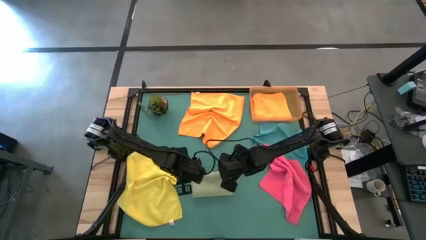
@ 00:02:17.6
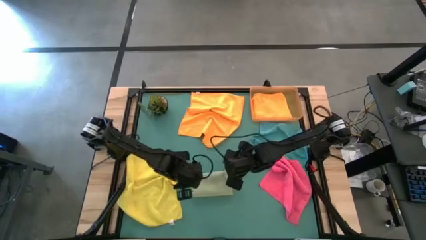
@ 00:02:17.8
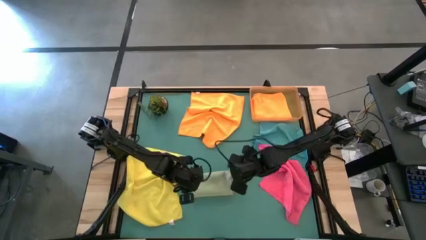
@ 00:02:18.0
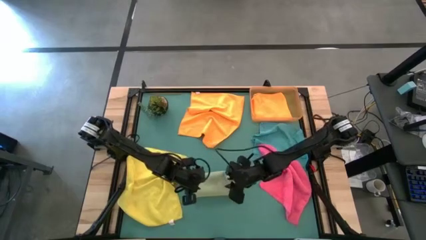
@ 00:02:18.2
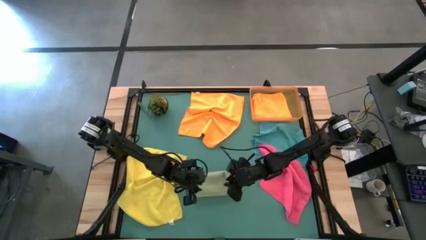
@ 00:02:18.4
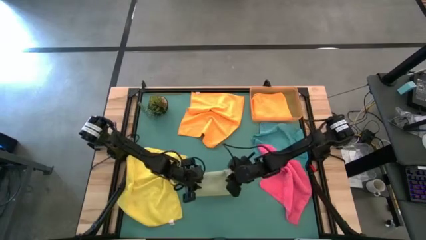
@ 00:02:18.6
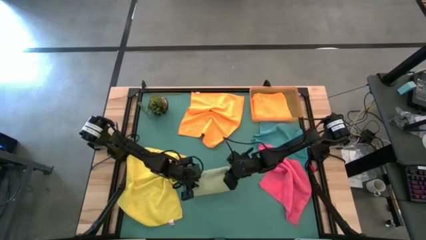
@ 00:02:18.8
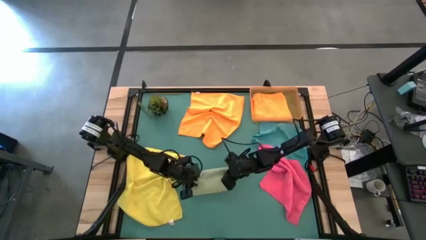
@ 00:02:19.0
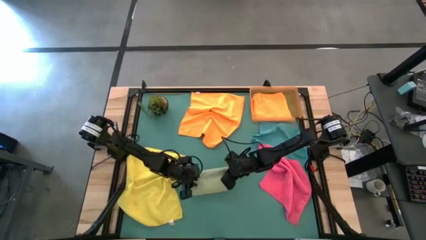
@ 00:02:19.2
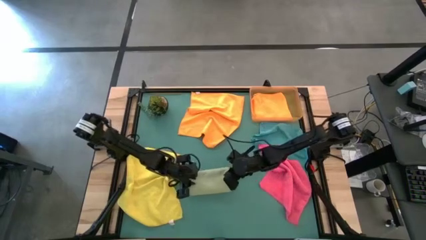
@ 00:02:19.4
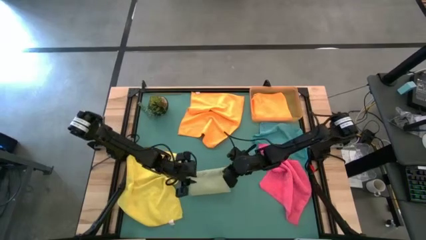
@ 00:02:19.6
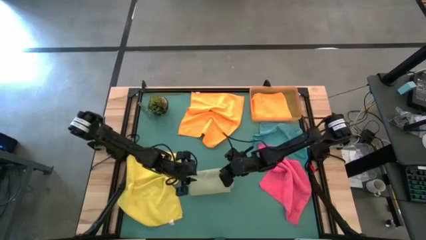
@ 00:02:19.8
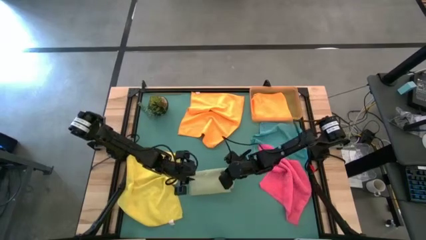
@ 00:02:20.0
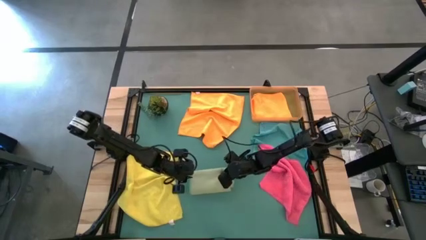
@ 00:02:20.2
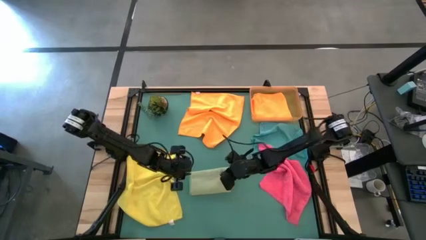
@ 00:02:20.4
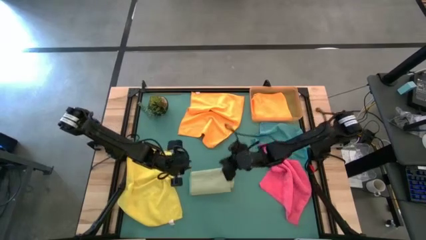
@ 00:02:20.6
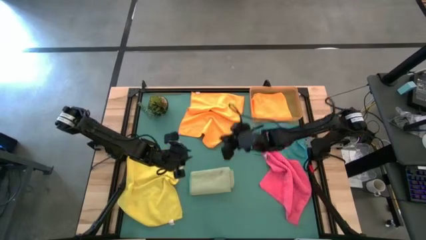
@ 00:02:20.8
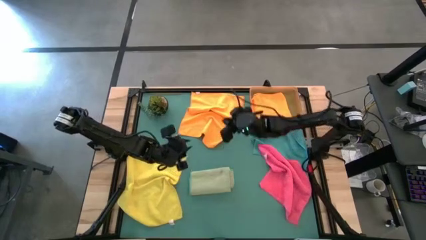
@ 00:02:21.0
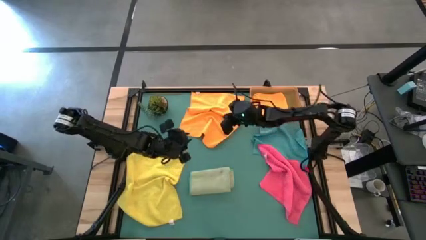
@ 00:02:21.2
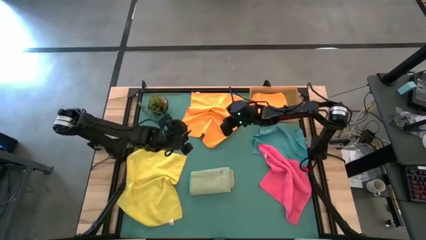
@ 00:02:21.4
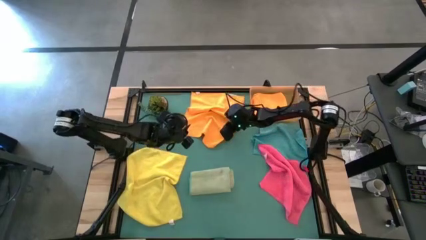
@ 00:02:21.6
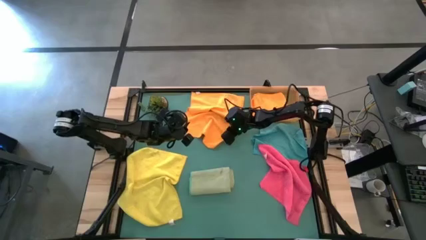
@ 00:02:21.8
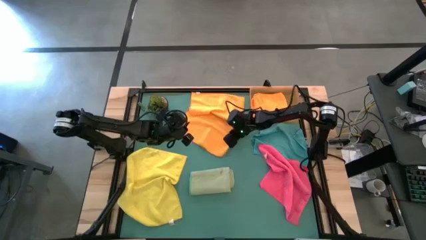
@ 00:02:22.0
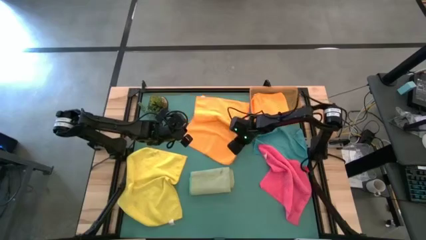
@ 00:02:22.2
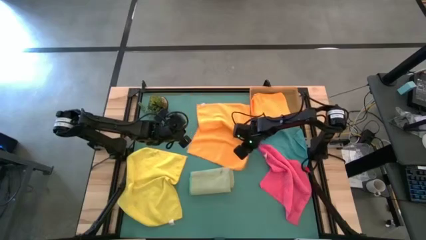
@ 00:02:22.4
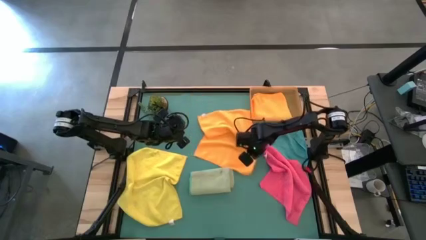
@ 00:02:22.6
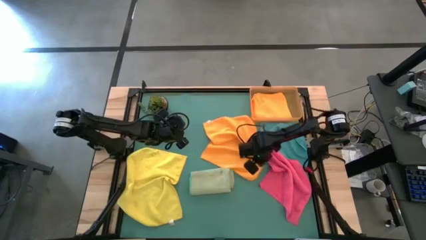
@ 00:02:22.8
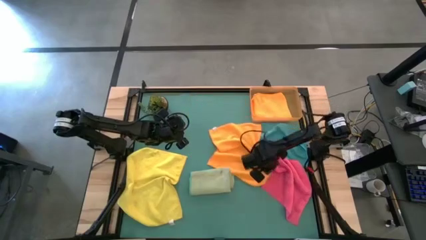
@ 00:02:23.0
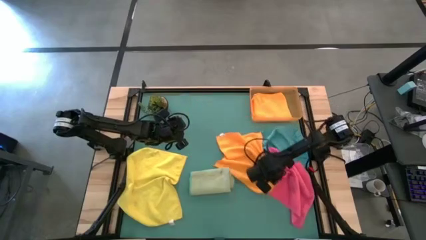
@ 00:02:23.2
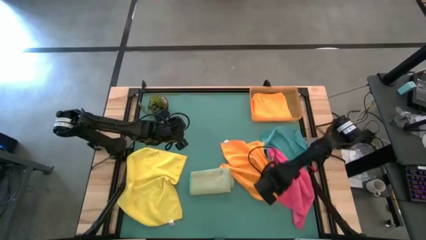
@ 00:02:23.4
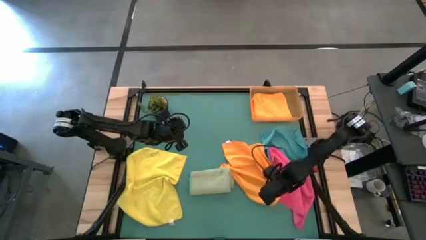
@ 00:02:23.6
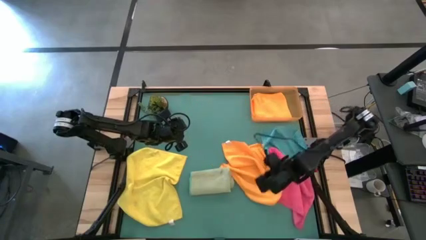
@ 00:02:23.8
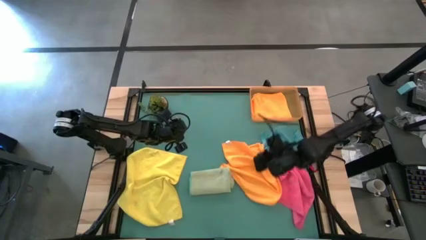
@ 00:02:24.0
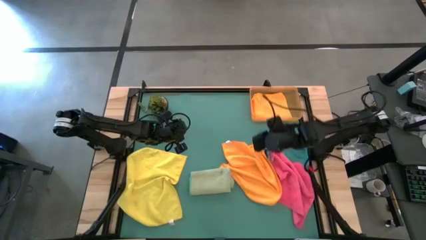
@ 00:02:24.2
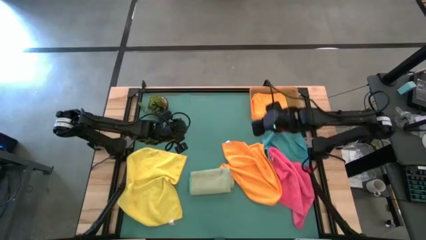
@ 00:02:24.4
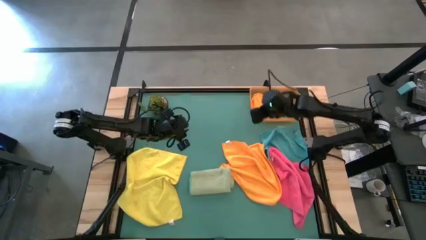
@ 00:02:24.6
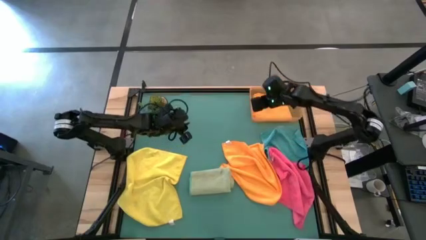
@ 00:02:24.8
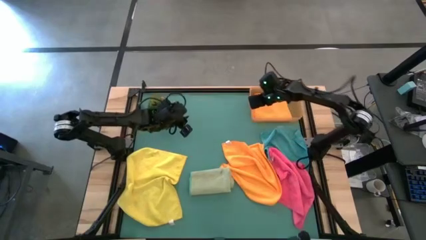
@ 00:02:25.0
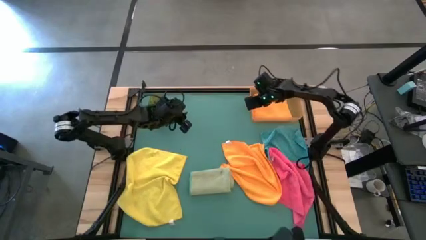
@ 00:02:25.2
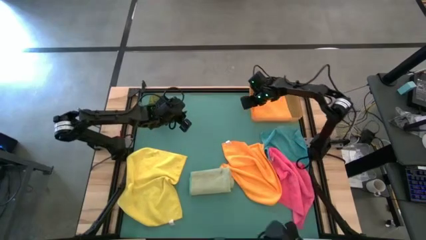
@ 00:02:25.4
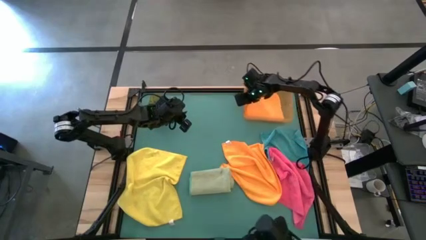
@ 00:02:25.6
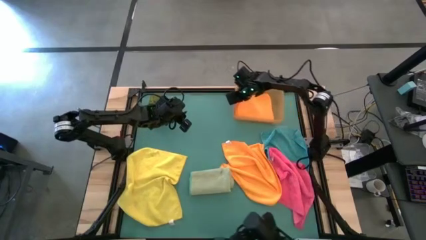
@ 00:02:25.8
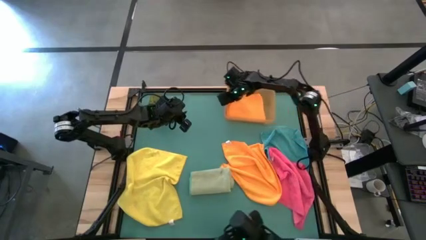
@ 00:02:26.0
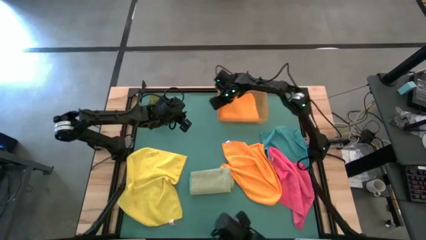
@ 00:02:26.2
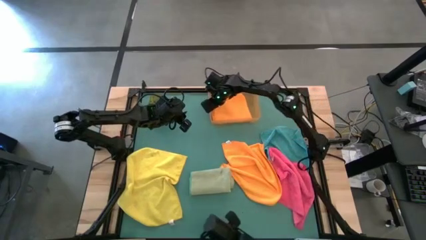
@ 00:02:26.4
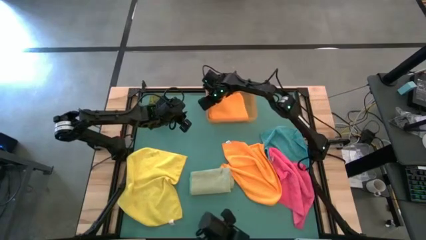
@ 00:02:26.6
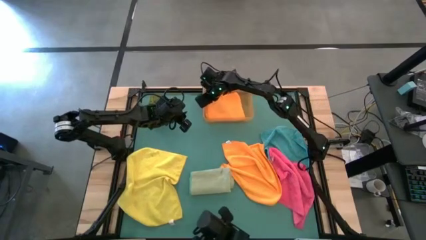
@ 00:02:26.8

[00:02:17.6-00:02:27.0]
Task: Fold microfiber towels
Adjust the orange bin

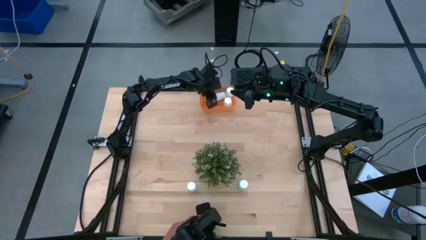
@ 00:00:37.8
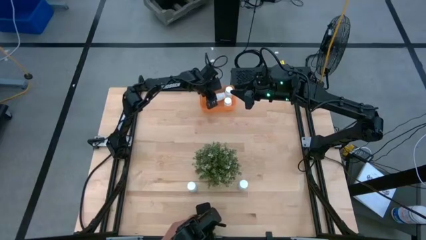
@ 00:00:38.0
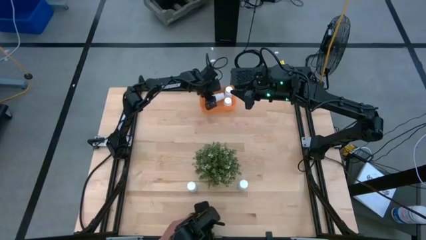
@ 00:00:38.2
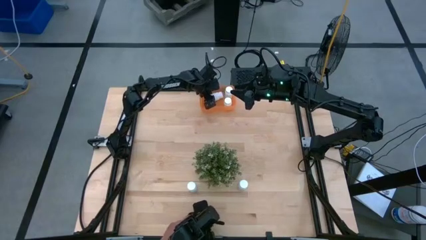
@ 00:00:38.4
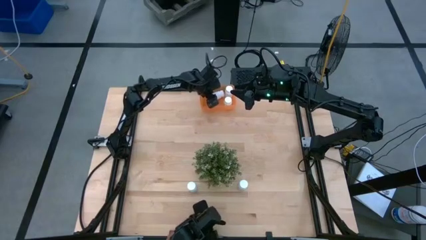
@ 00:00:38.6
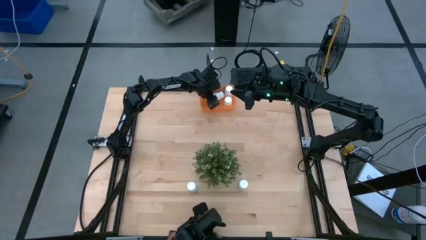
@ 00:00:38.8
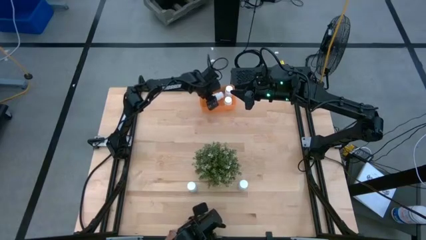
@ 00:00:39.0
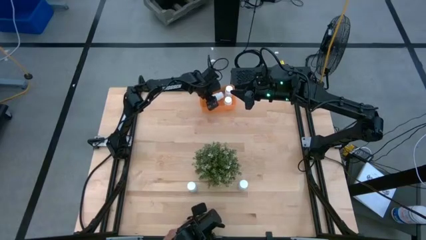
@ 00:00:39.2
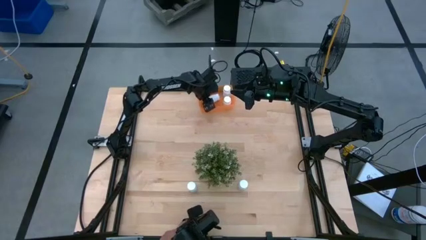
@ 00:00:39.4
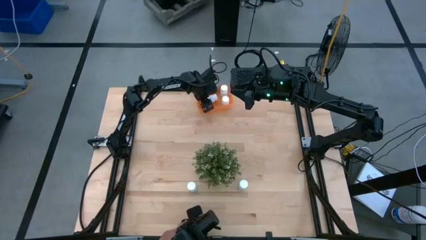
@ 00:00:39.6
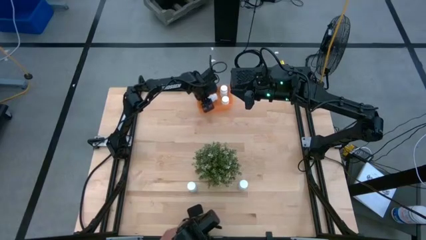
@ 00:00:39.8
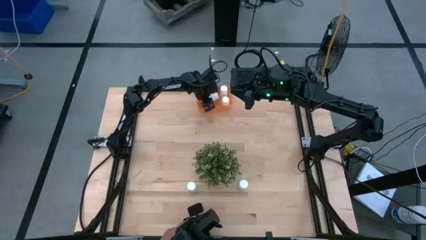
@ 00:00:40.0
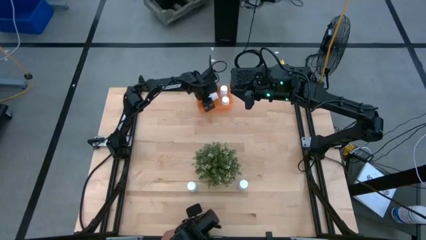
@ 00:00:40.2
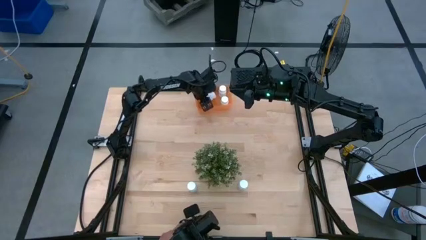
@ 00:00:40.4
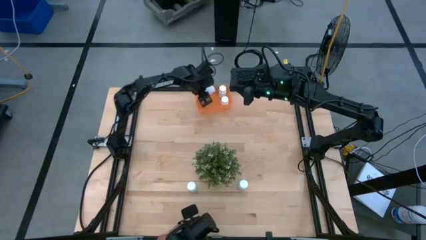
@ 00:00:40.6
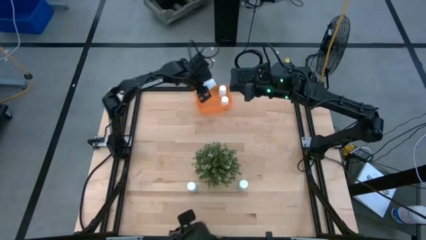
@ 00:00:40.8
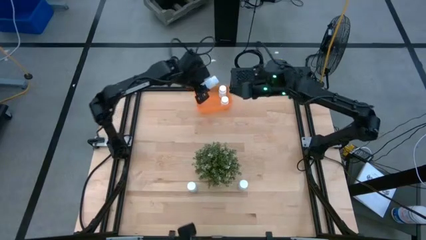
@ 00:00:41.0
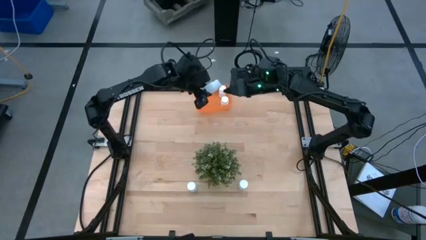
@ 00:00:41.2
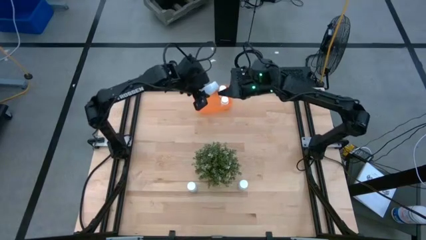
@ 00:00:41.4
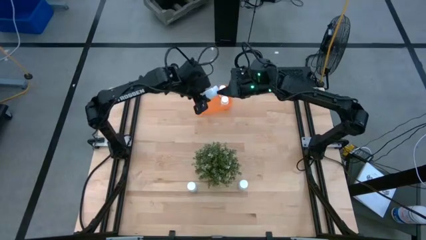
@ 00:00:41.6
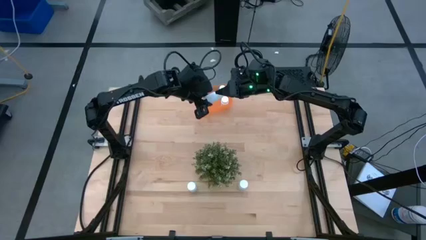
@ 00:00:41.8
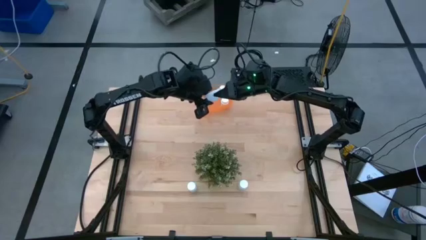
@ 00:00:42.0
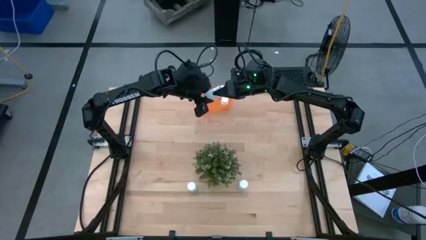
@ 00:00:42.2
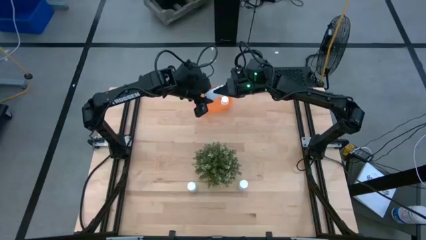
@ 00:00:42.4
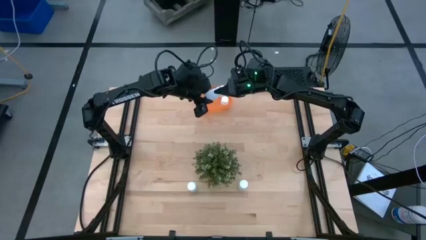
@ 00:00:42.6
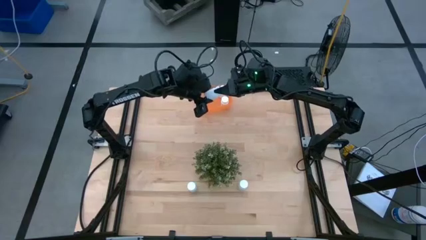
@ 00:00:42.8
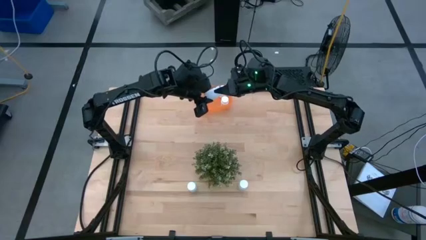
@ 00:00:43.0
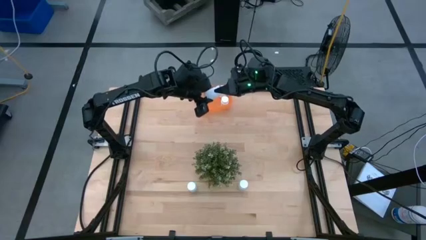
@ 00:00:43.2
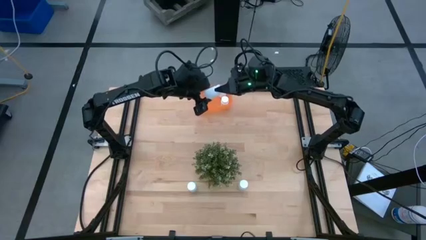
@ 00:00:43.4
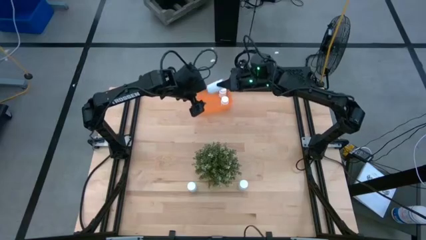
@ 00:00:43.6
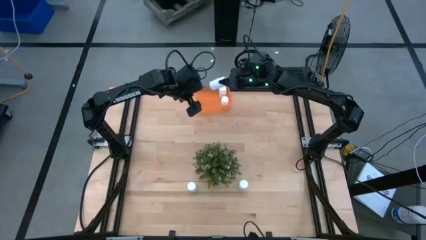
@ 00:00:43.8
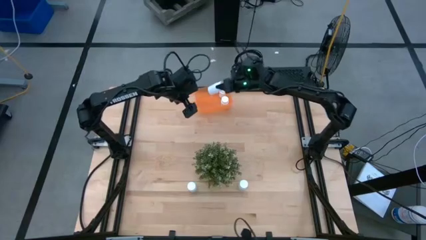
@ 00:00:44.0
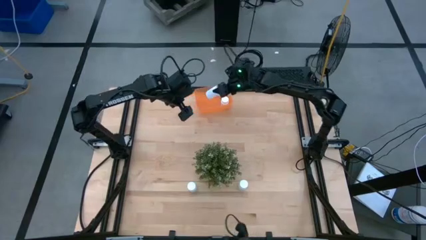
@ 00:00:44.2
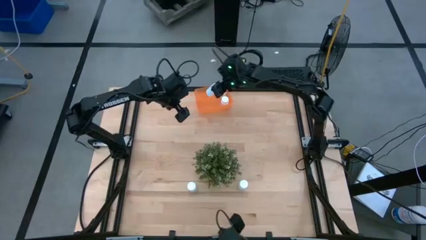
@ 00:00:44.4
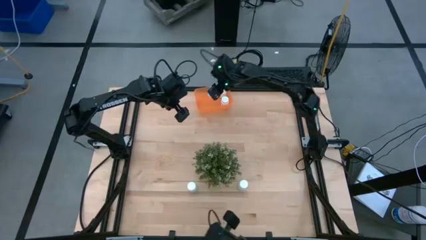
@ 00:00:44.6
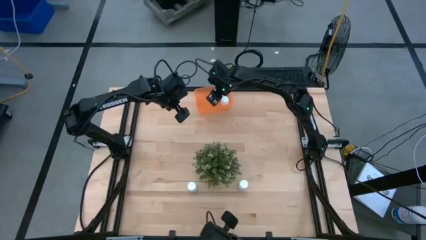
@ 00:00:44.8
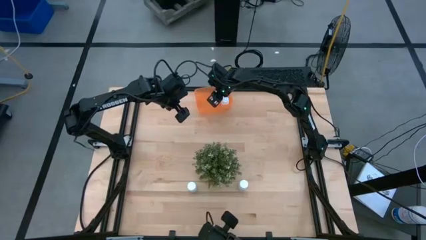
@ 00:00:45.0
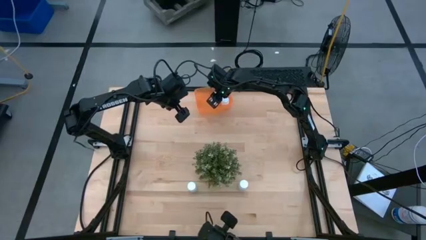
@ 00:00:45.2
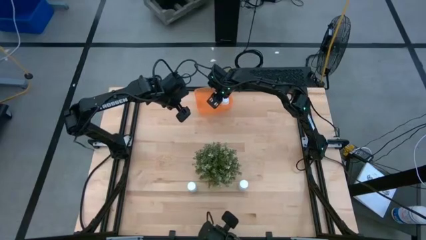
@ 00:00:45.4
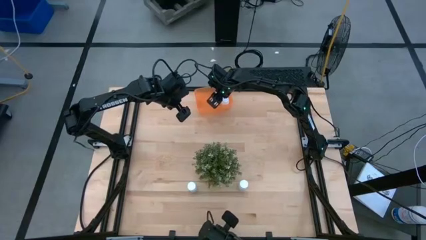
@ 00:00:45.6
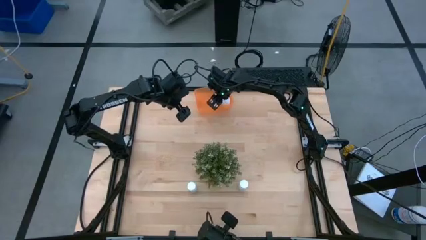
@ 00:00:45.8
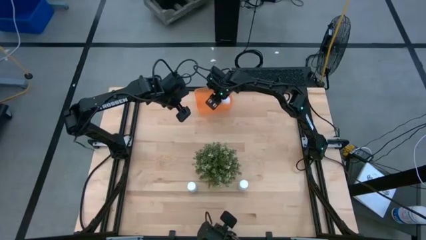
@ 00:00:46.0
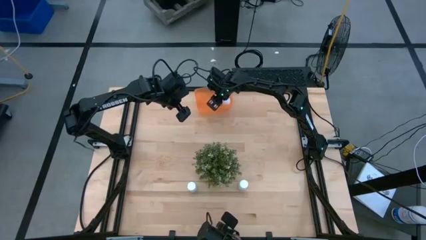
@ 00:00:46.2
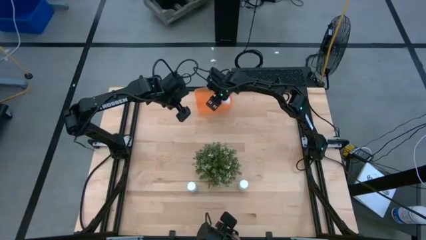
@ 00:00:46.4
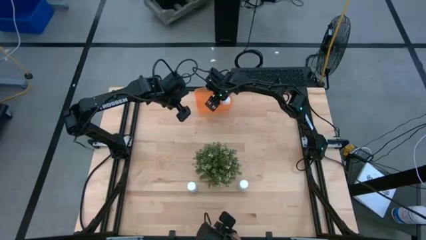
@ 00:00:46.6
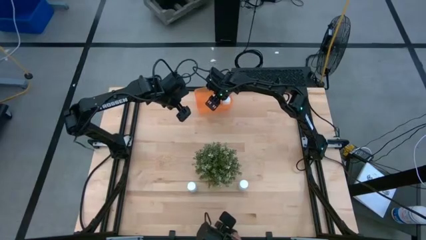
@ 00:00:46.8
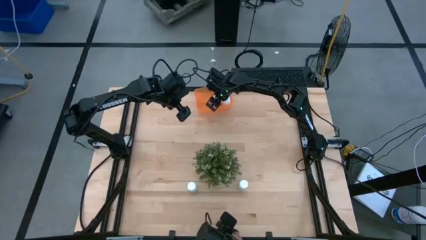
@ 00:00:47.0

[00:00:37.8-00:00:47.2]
Task: Pick and place pill bottles into a basket
Put the top white pill bottle into the orange bin
